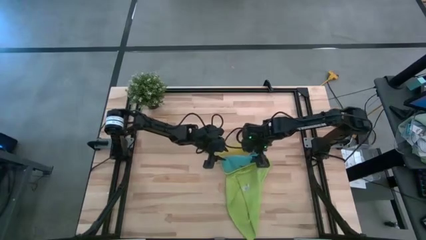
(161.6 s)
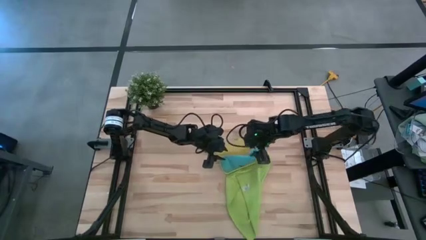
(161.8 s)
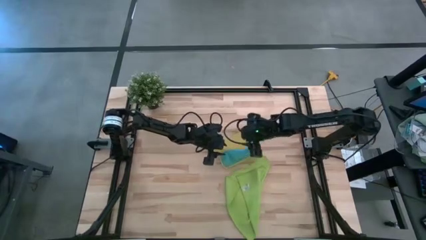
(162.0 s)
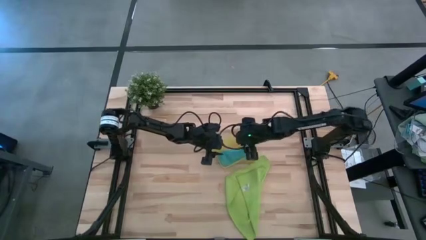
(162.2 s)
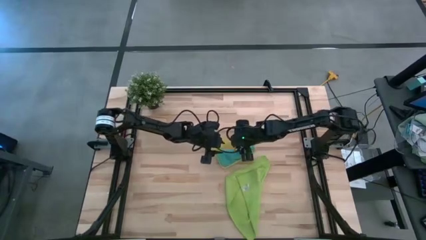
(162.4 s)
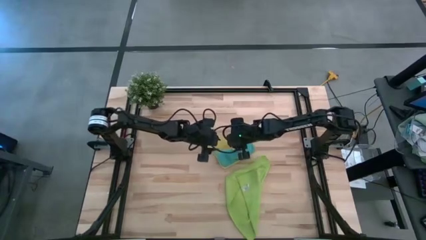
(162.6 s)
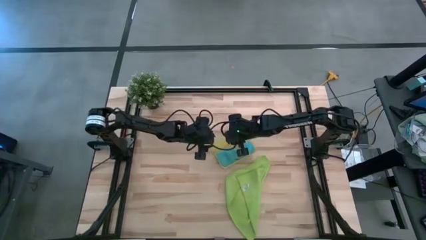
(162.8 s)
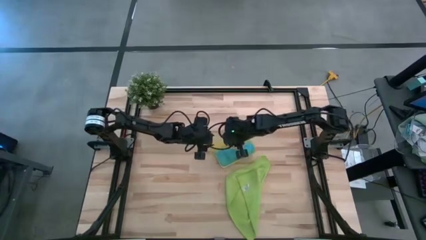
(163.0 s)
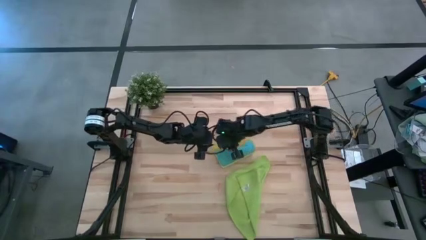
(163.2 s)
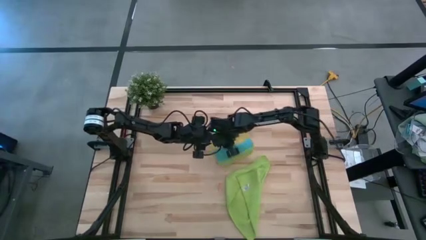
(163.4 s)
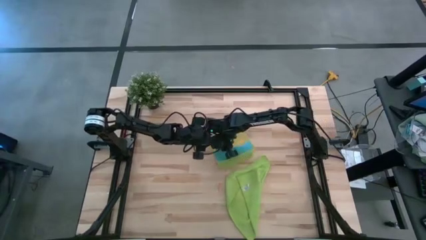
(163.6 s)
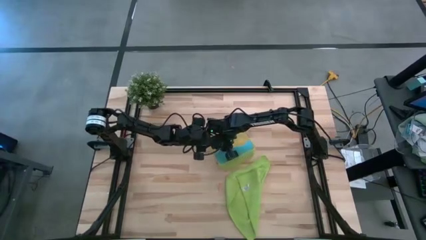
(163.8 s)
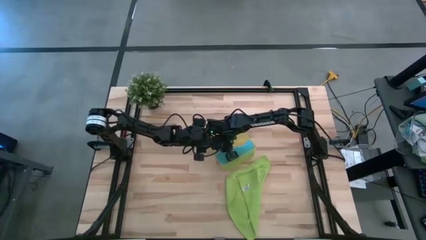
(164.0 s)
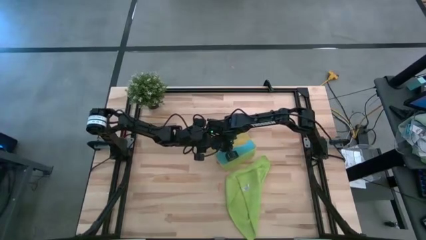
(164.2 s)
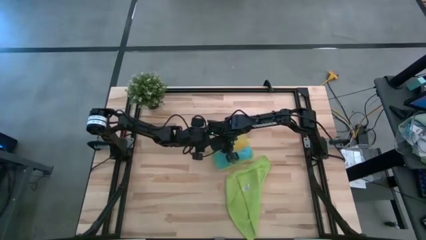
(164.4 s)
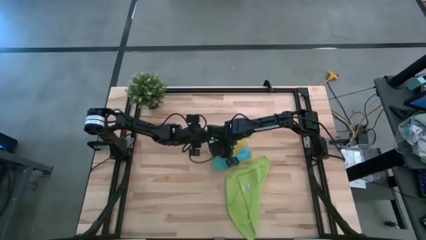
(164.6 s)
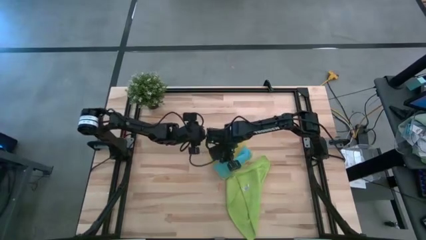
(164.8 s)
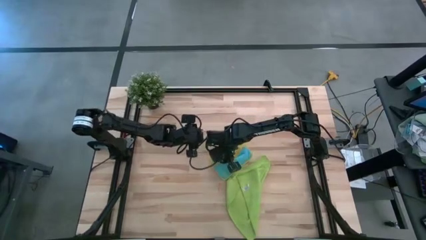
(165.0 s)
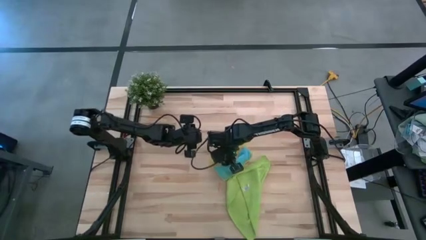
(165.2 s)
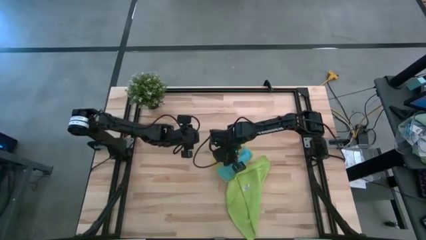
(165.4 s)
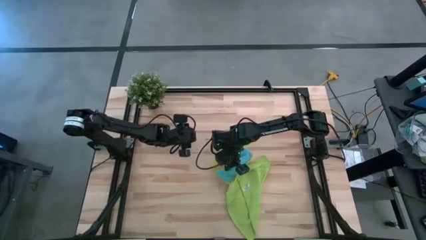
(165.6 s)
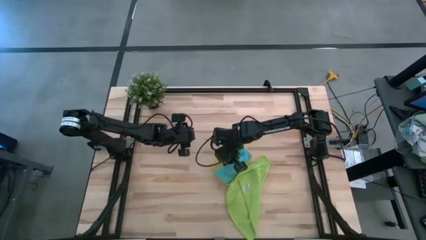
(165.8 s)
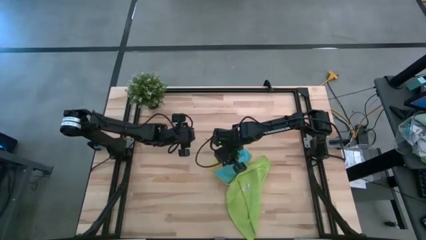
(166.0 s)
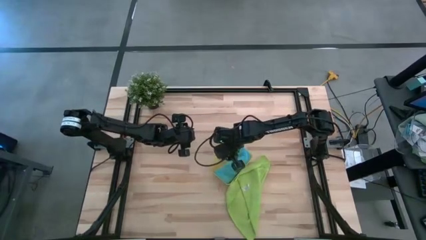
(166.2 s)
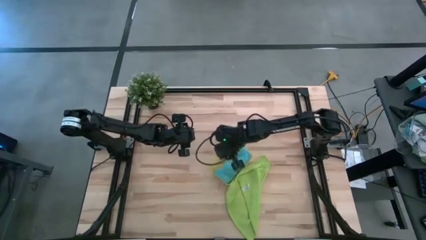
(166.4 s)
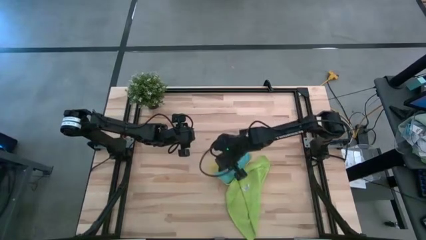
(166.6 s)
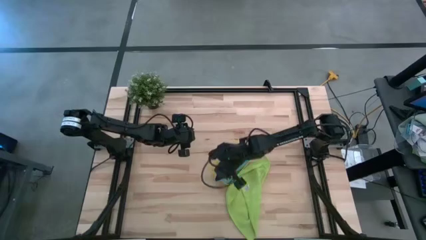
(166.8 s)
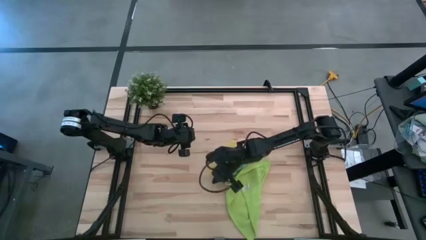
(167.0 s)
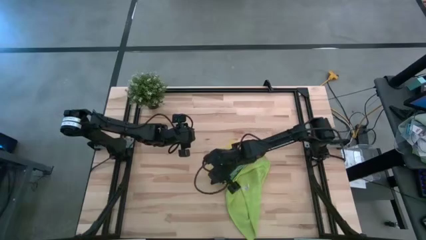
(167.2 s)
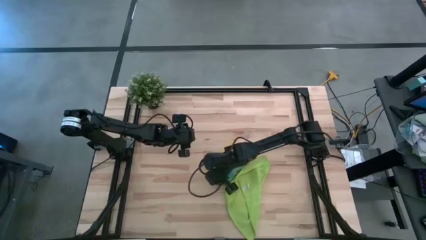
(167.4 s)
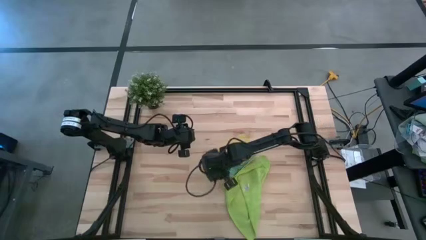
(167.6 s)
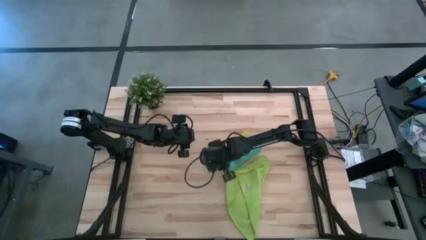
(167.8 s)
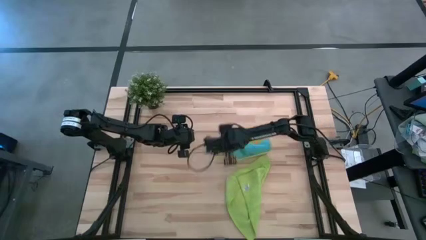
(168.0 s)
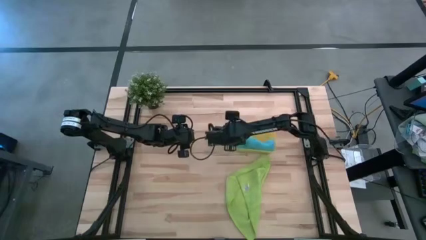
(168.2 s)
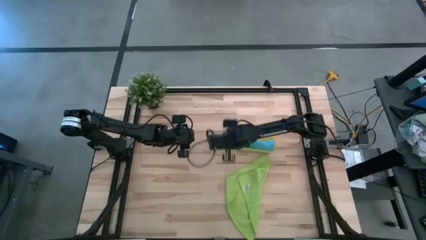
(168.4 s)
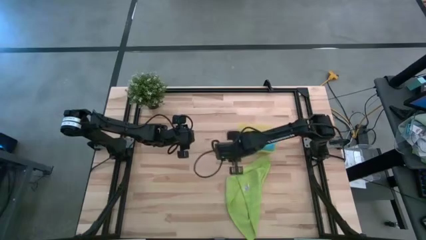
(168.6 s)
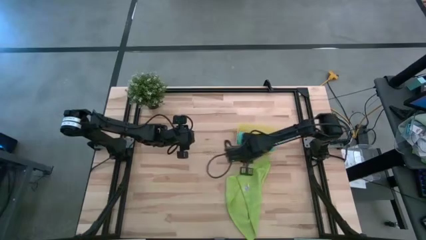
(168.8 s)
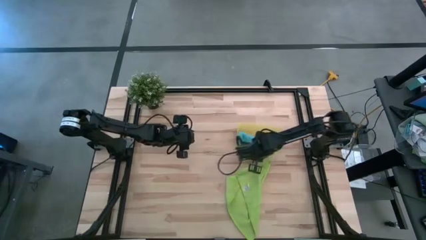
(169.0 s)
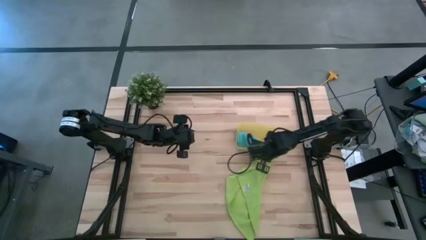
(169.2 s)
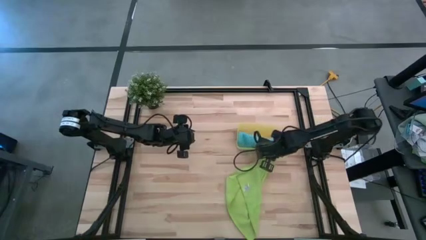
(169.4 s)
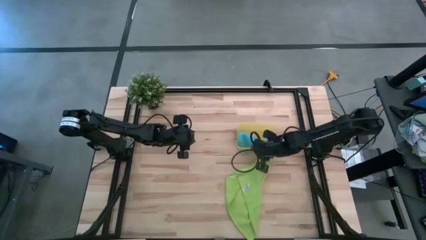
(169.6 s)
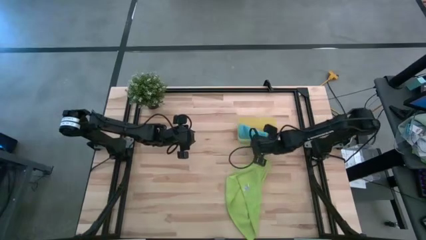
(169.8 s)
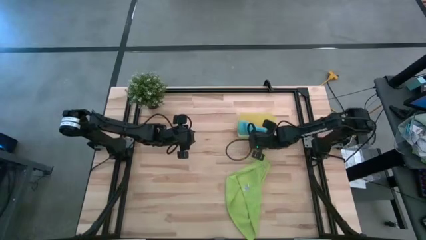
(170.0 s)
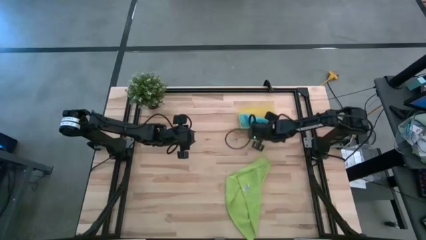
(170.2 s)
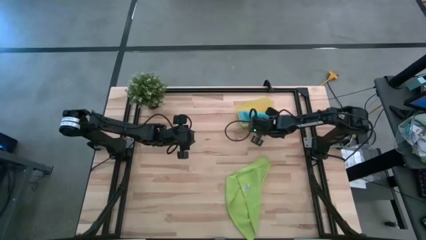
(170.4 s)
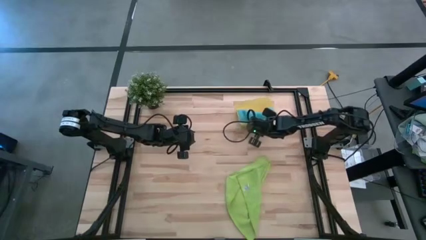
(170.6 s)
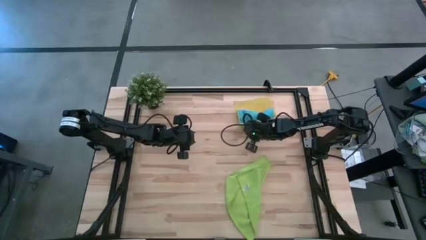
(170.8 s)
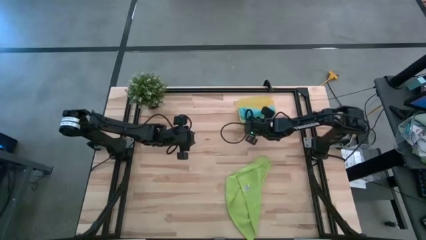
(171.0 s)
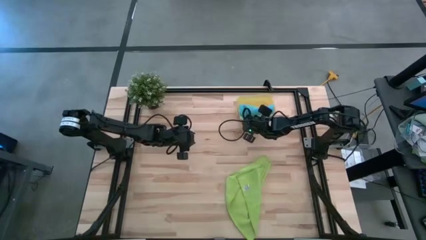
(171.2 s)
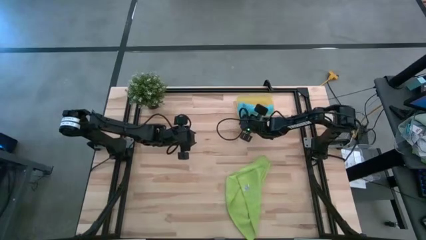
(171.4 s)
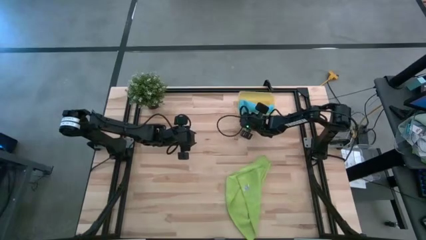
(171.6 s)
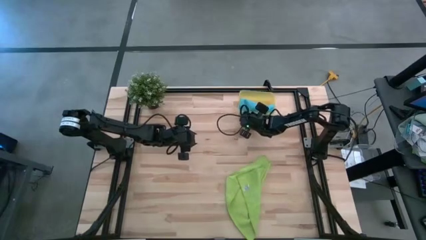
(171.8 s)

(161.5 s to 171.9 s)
Task: Roll microfiber towels into tight, uniform cylinder then place into a basket
Move the yellow bin to the top right of the table

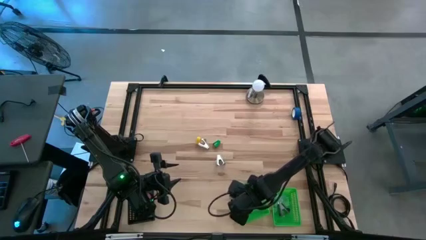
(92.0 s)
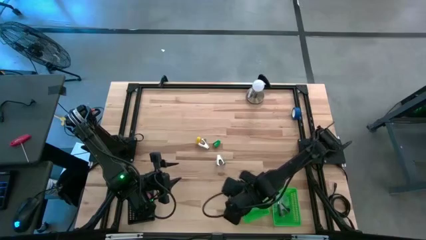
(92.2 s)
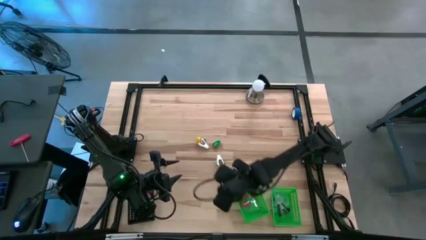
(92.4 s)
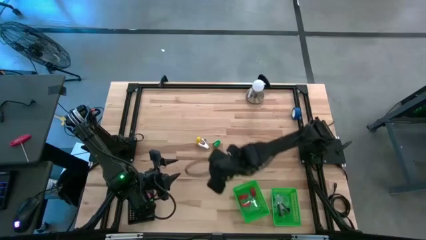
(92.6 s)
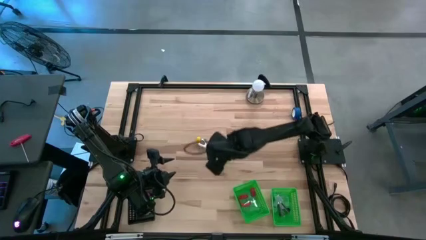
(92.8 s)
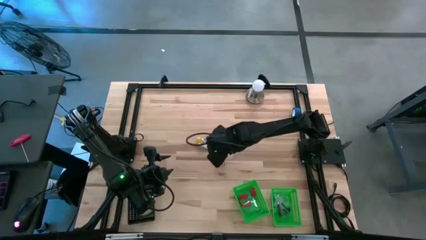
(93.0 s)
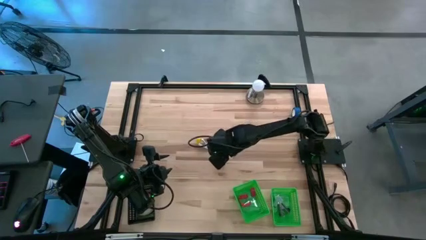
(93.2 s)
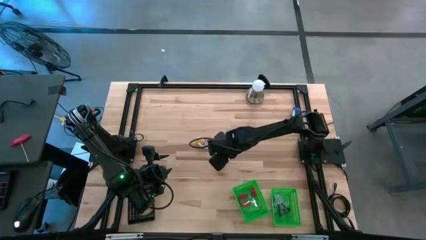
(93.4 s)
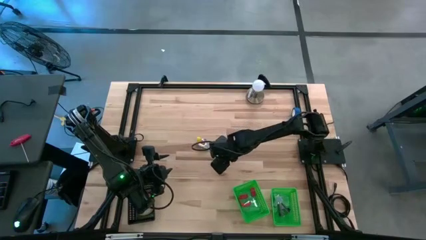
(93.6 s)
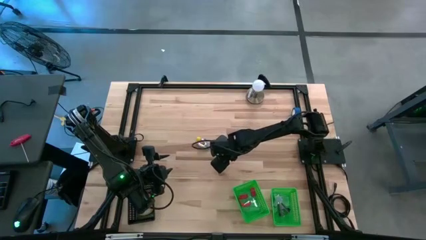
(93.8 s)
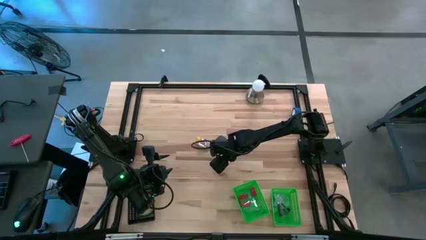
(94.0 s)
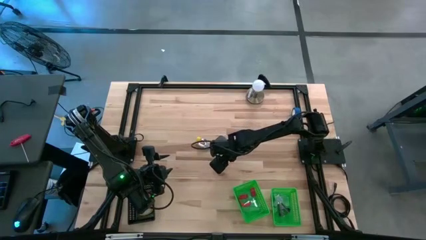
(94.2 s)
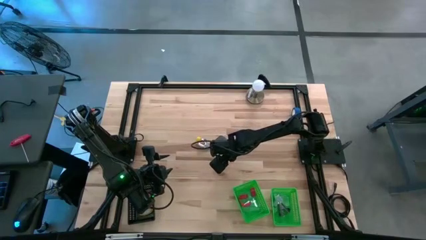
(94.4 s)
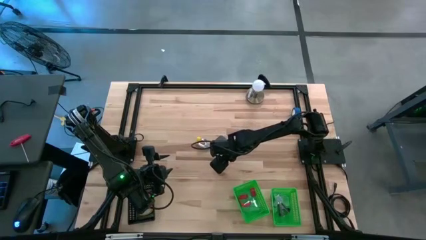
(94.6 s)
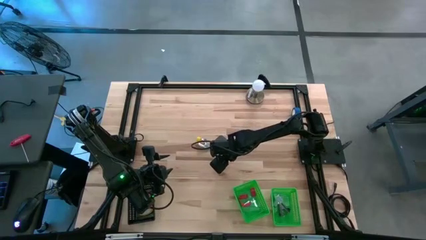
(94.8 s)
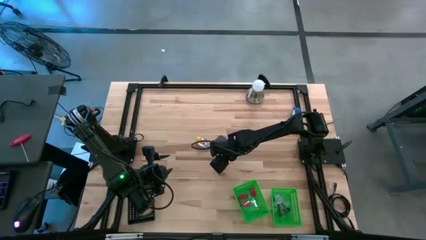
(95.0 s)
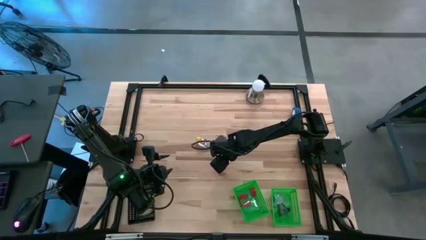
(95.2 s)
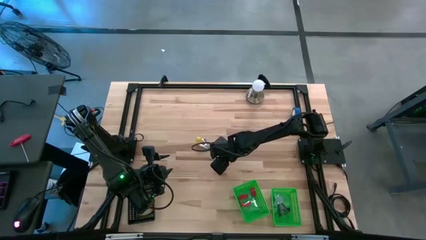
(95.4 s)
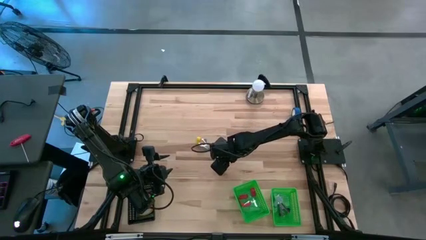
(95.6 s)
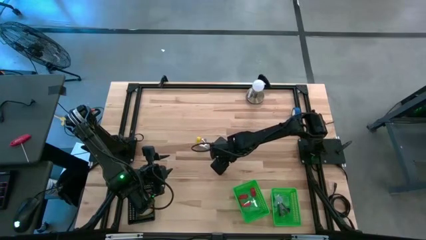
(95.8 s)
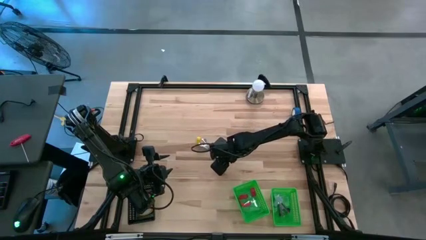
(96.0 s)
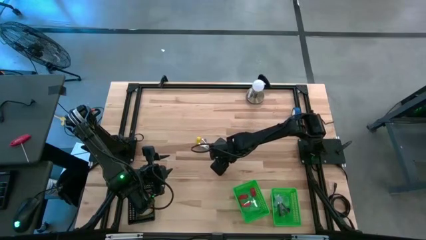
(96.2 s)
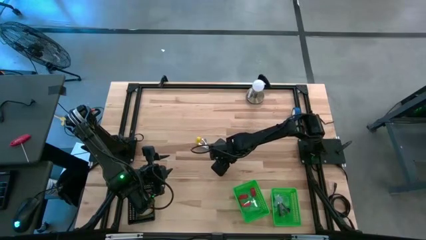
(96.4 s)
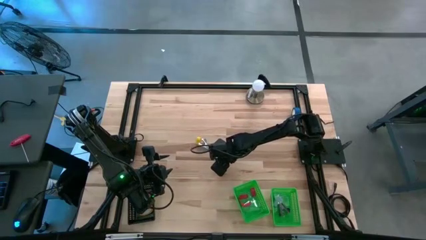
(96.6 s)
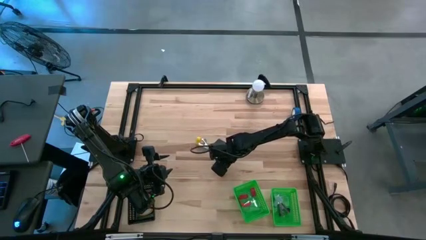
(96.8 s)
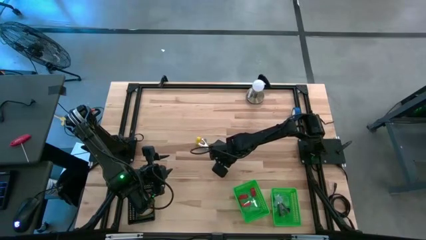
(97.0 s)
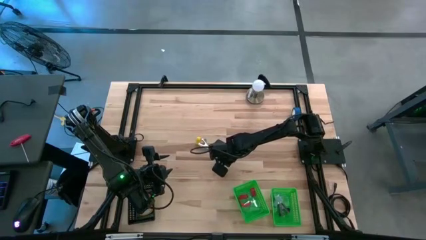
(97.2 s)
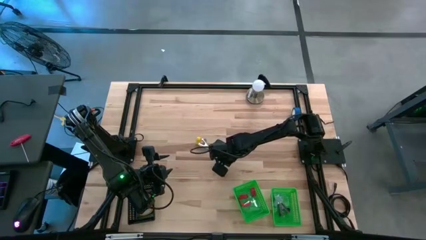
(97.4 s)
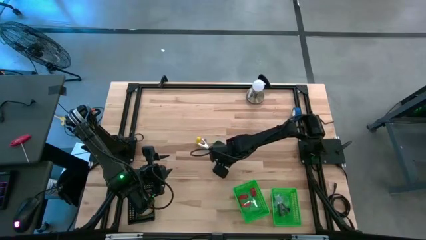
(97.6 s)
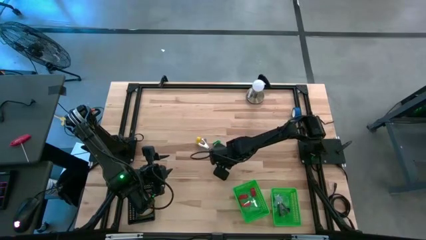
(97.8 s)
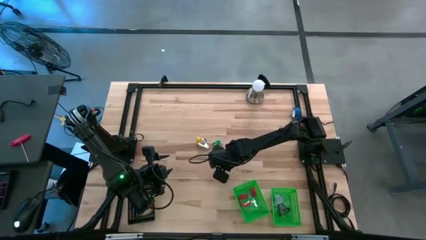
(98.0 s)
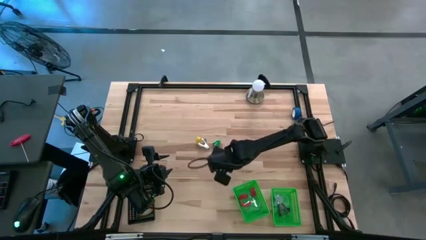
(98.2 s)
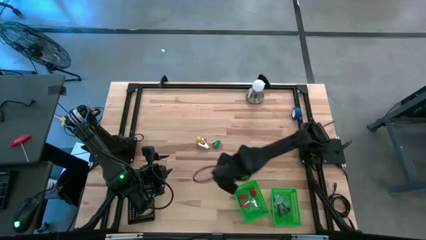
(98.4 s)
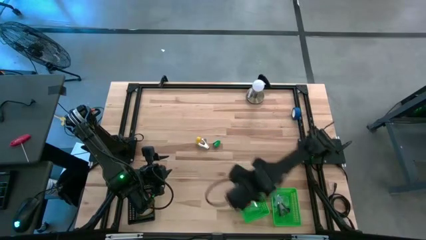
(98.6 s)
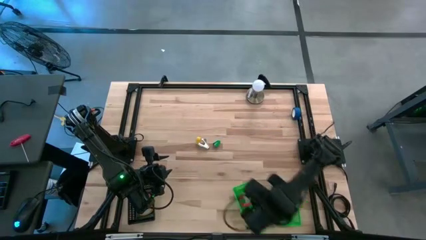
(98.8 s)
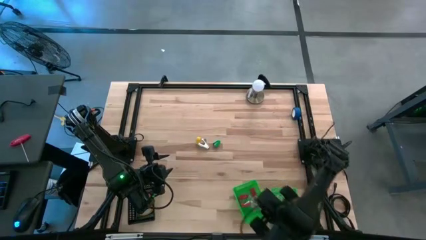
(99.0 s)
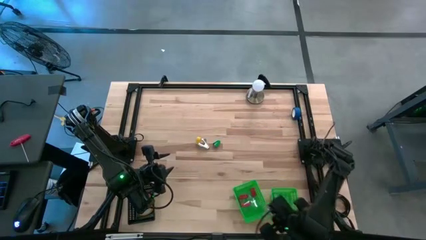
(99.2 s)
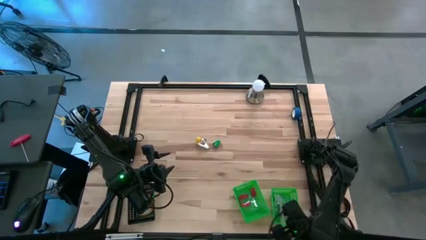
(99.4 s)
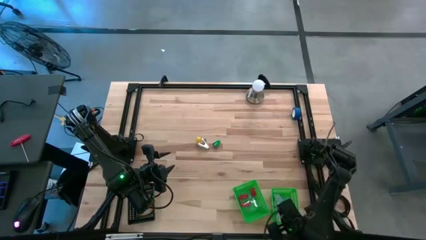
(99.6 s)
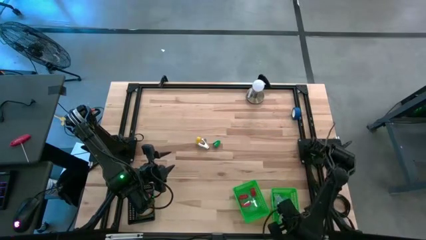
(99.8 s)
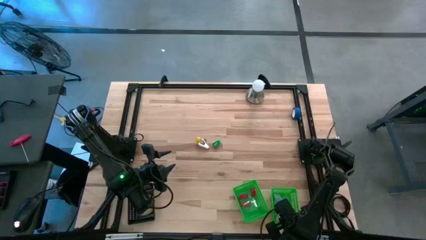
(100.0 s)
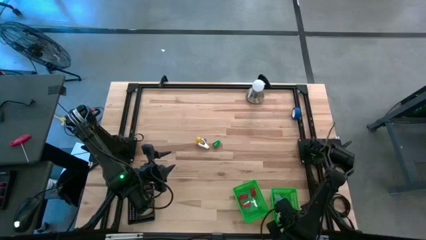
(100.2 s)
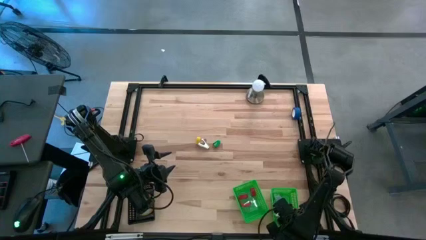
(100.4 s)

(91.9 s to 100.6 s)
Task: Pick and place Stapler, Stapler remover, tape
Put the gray staple remover into the right green bin
